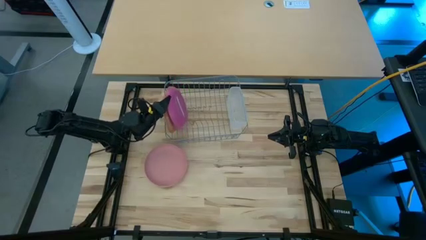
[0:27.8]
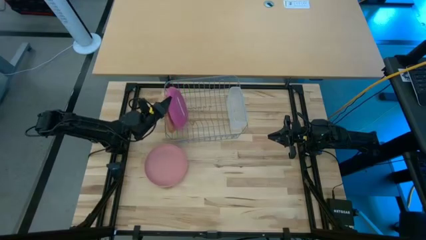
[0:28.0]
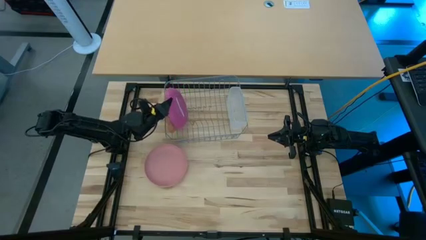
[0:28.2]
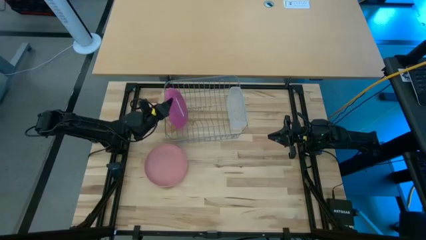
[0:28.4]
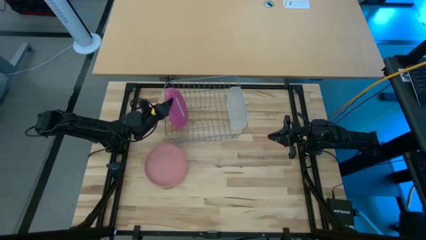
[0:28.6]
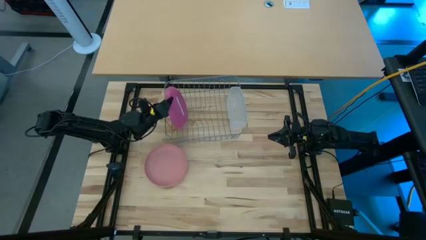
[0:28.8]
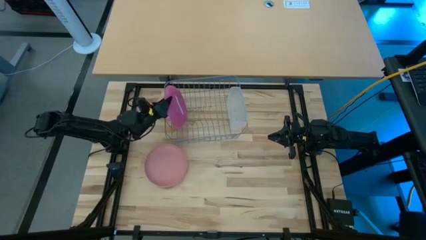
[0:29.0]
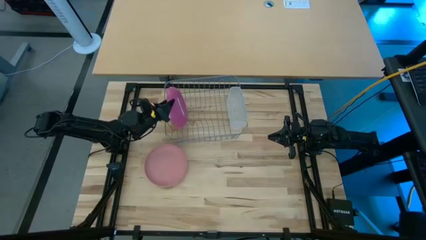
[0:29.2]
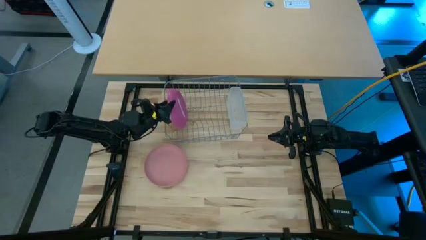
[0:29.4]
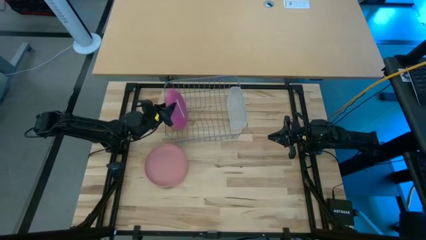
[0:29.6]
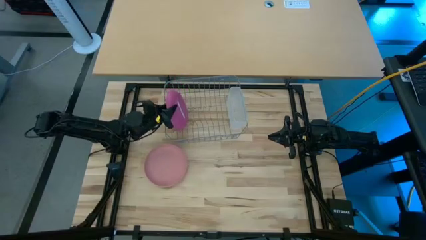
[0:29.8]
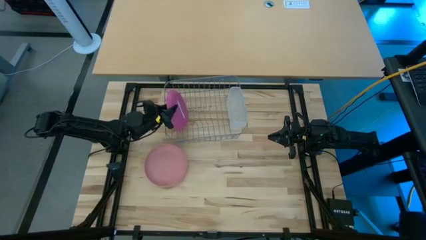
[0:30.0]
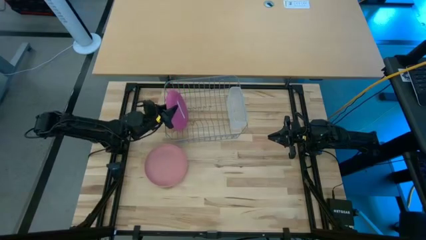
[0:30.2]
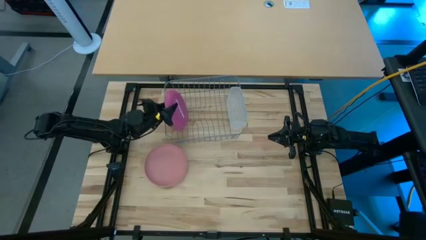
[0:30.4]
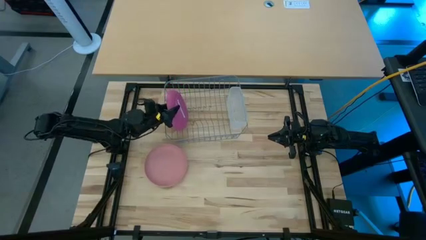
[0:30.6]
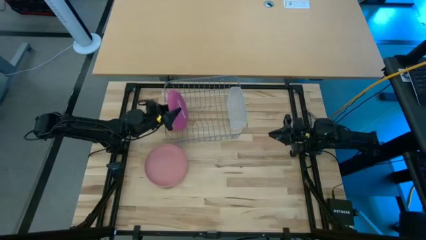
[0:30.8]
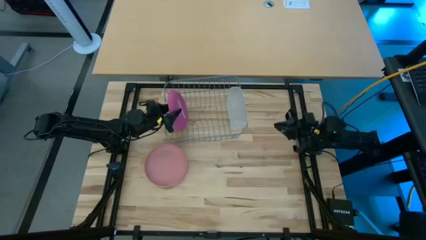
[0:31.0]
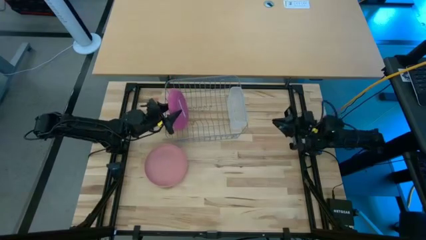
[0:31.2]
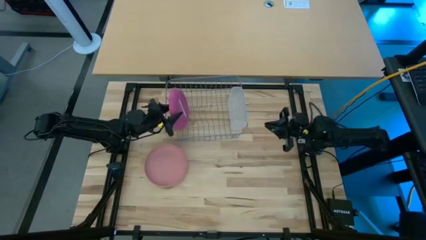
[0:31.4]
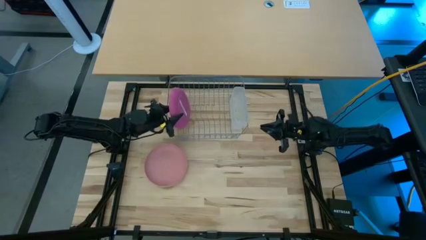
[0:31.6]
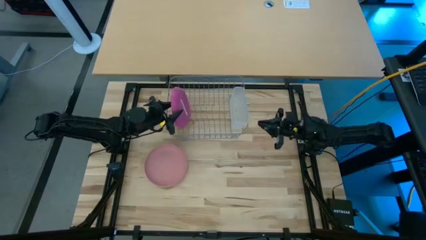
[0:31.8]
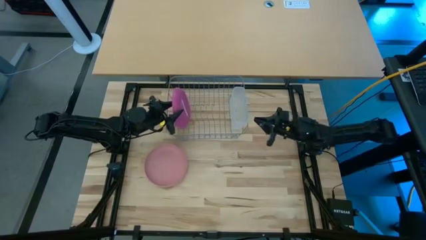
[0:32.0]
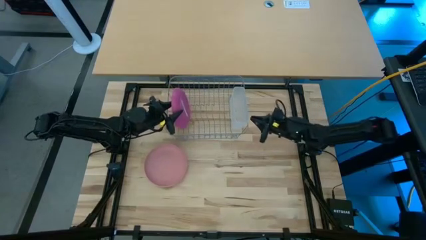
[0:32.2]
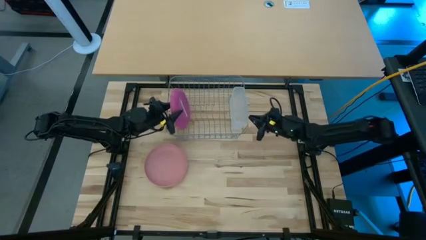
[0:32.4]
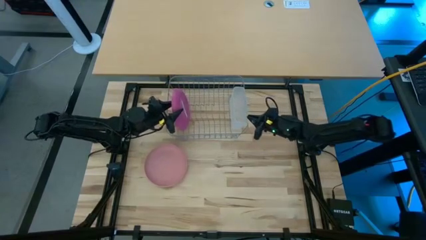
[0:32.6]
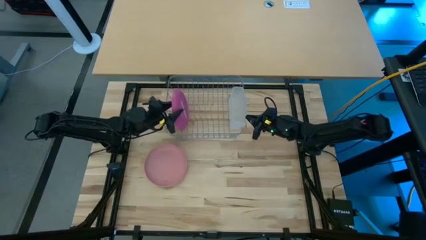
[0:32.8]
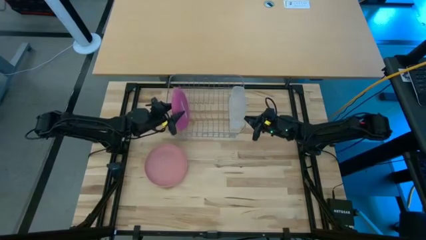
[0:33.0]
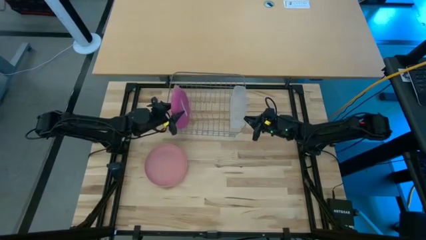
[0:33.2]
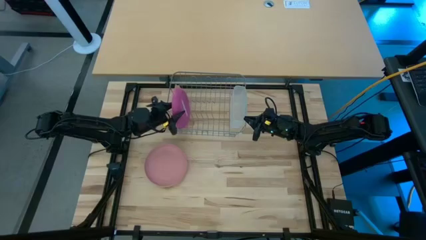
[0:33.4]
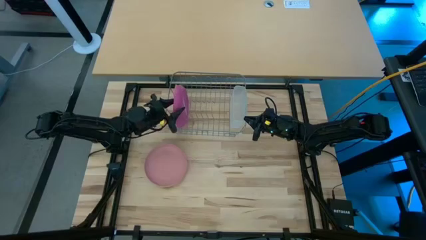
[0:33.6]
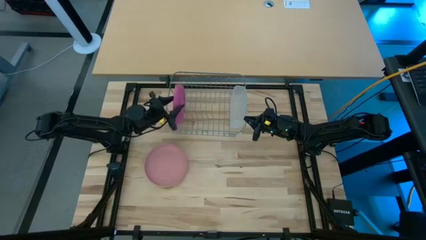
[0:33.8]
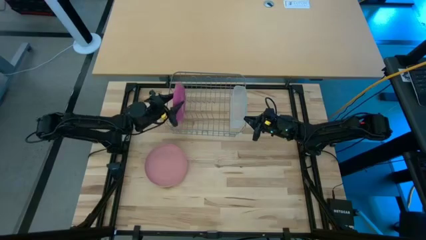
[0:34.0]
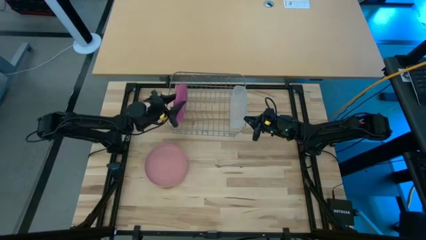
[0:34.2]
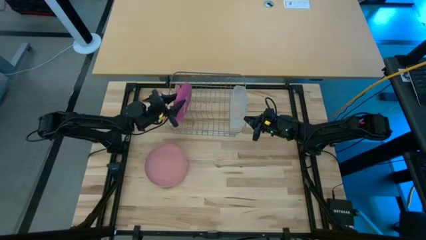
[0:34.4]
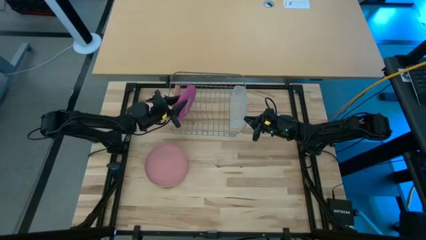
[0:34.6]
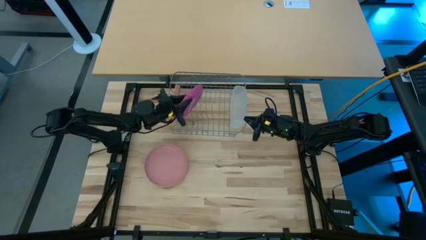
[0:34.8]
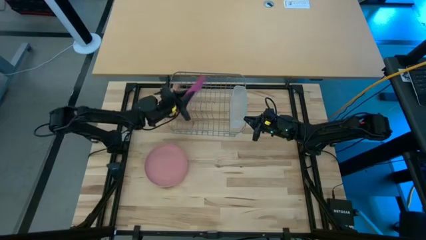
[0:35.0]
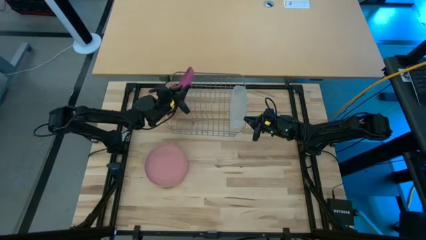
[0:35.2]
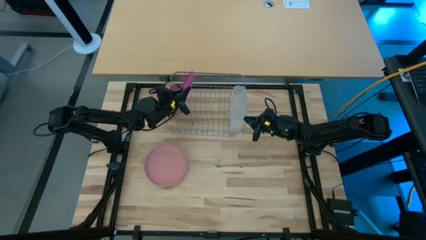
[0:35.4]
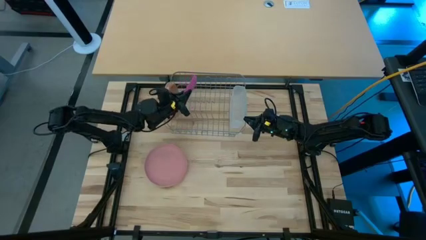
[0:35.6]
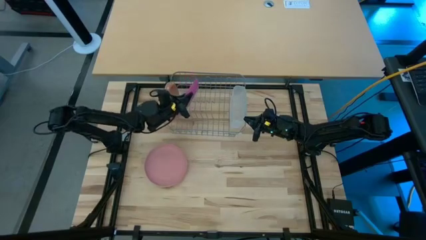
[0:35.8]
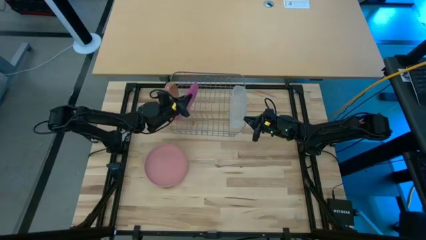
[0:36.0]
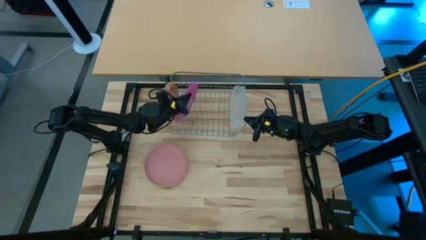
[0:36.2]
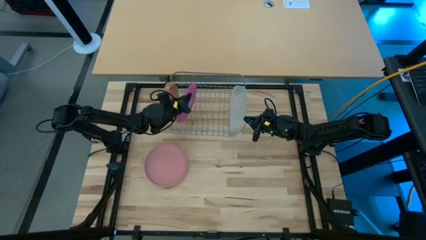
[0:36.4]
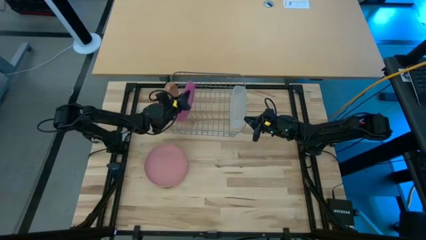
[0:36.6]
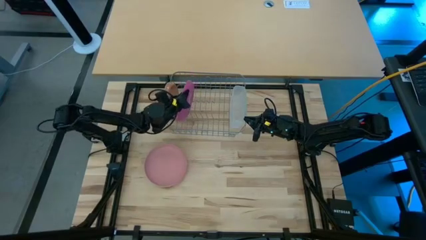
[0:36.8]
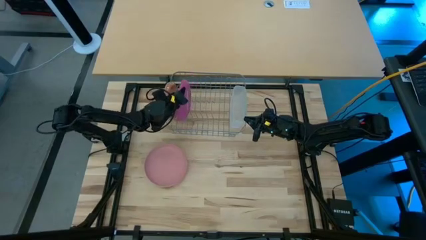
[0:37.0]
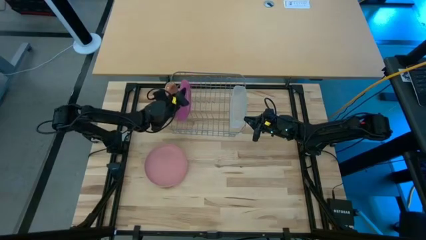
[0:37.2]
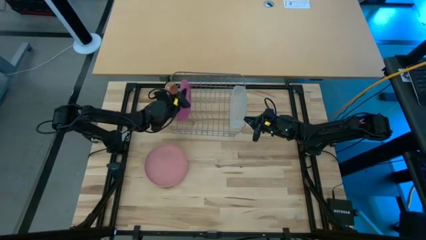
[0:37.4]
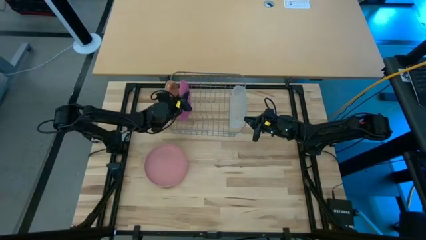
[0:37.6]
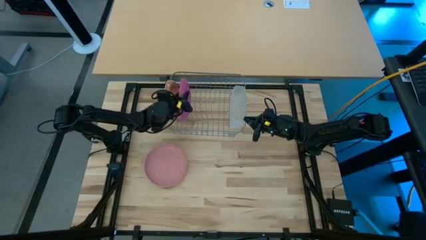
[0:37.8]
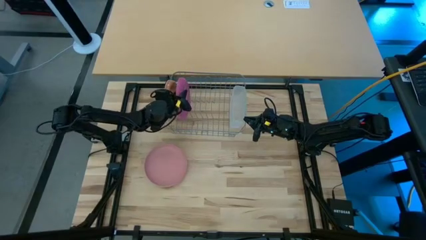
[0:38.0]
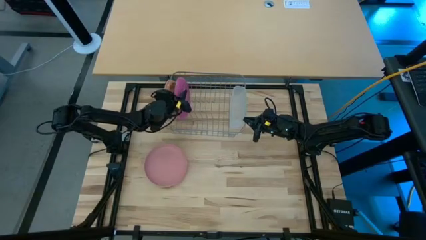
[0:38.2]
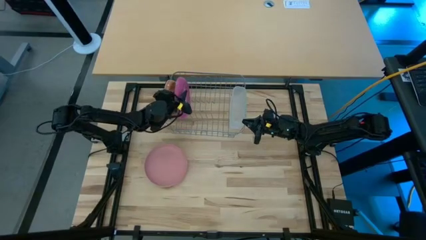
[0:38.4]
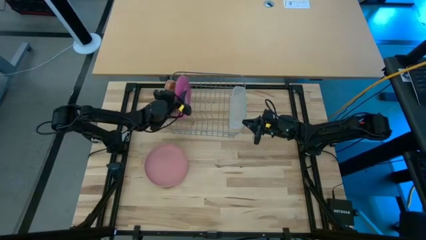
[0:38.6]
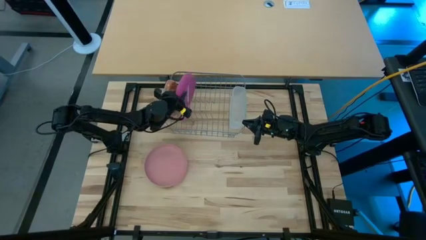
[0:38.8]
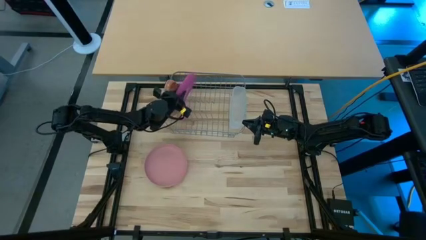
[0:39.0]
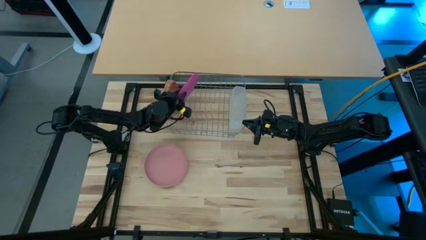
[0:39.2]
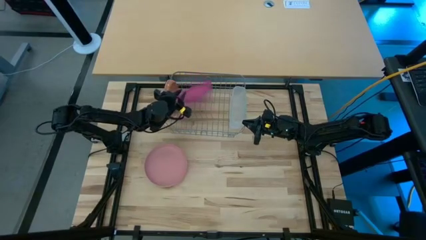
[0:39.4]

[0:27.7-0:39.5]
Task: Sort dishes
Put the dark pink plate into the dish rack
